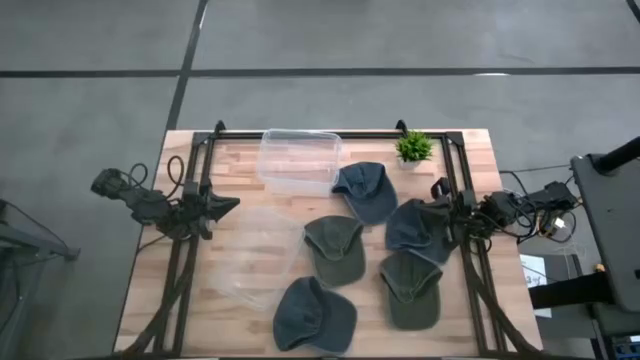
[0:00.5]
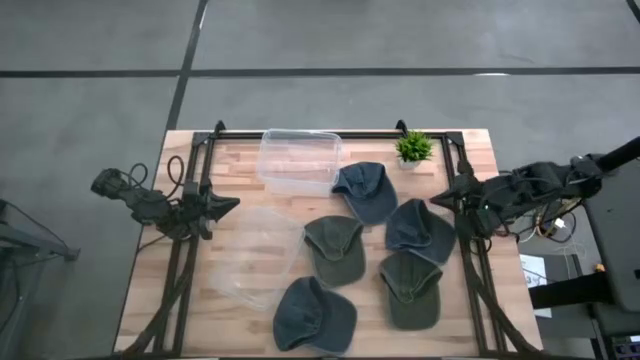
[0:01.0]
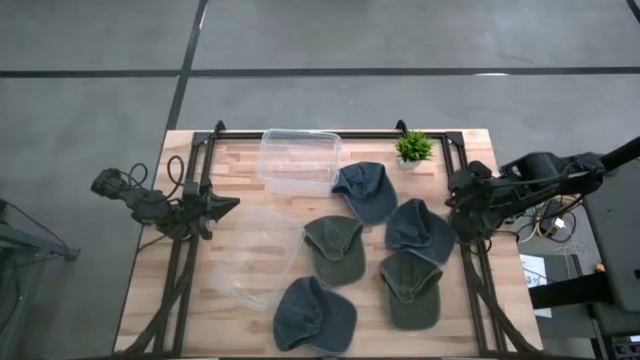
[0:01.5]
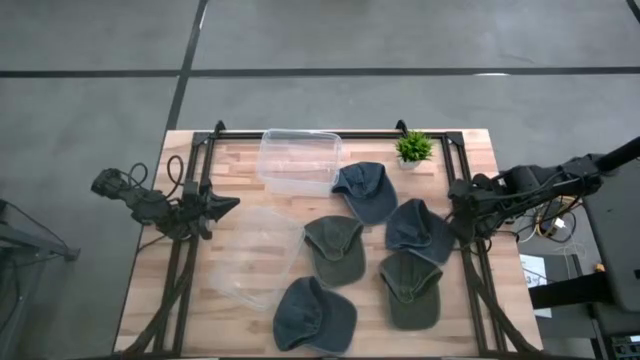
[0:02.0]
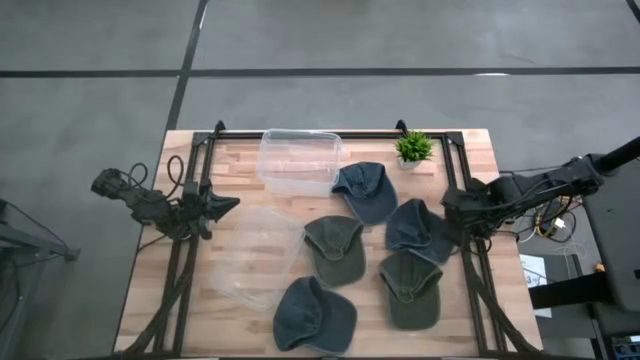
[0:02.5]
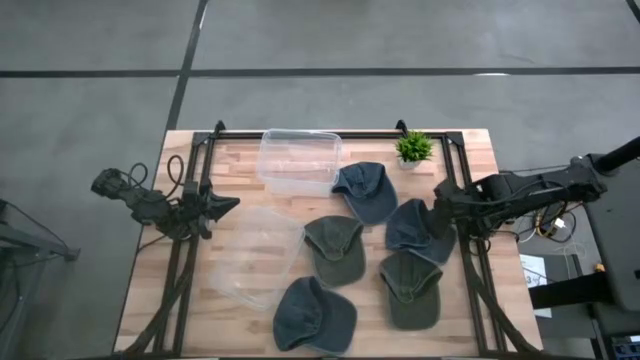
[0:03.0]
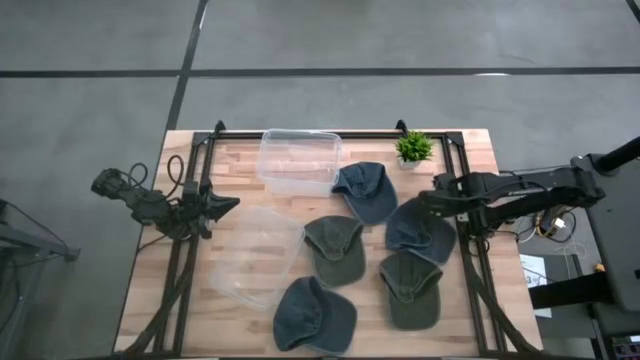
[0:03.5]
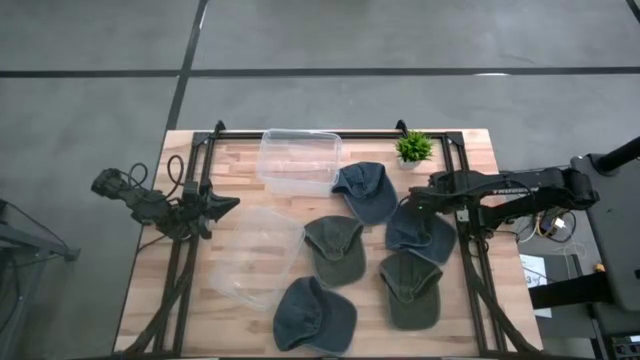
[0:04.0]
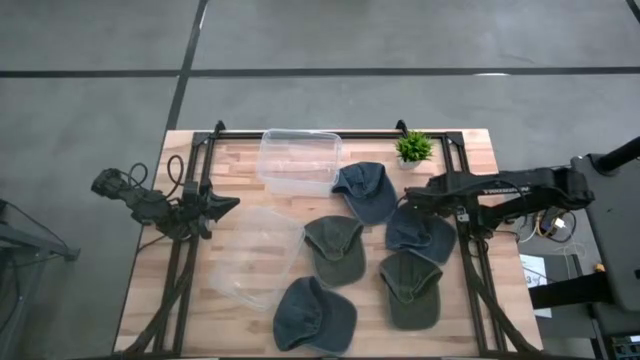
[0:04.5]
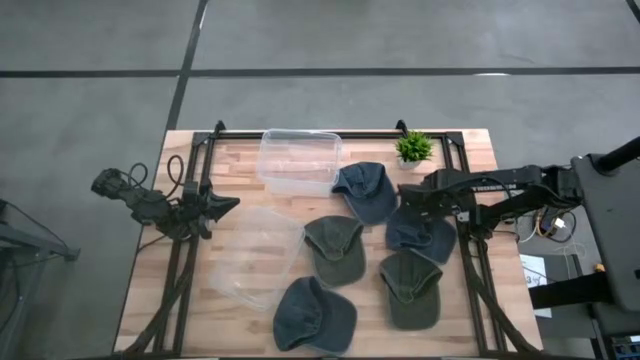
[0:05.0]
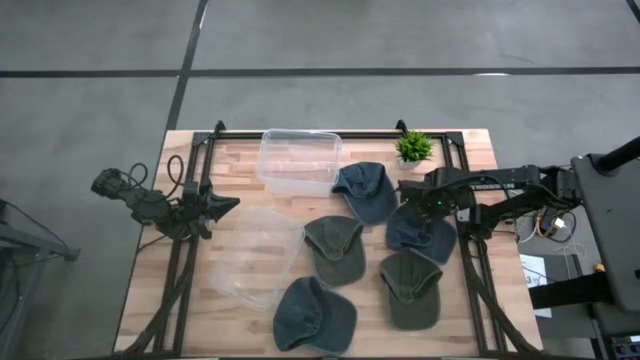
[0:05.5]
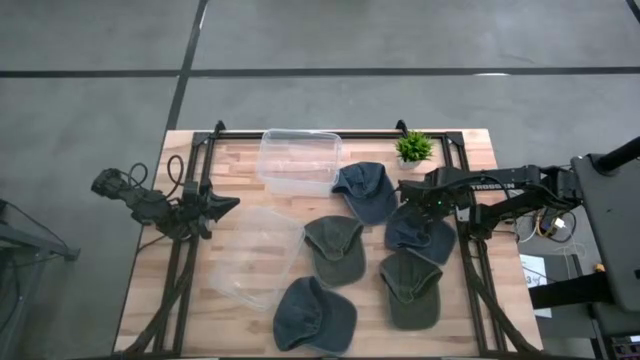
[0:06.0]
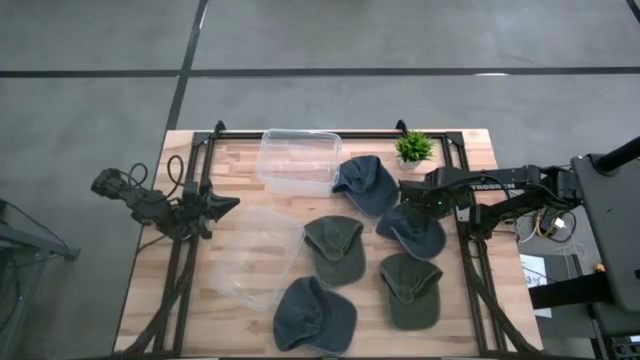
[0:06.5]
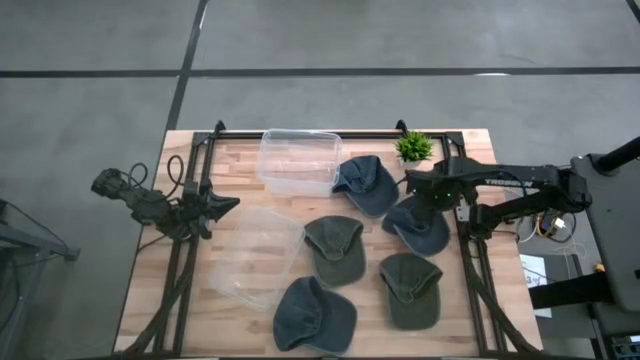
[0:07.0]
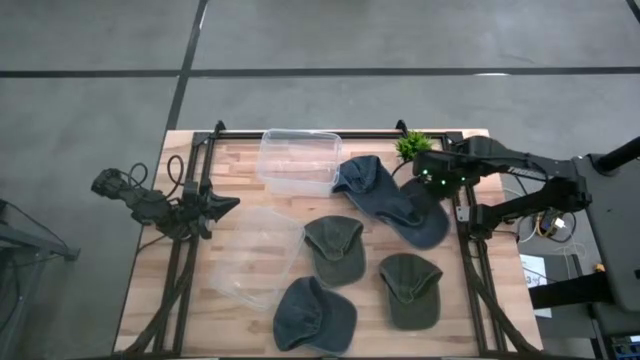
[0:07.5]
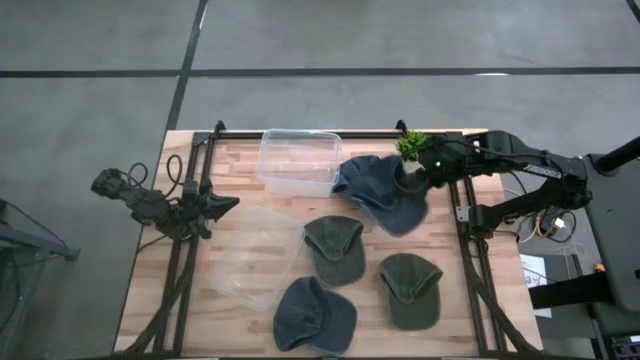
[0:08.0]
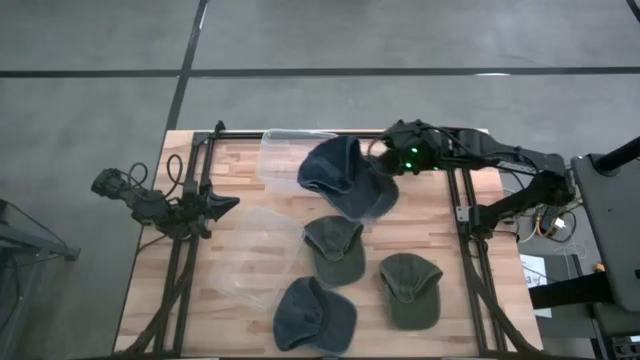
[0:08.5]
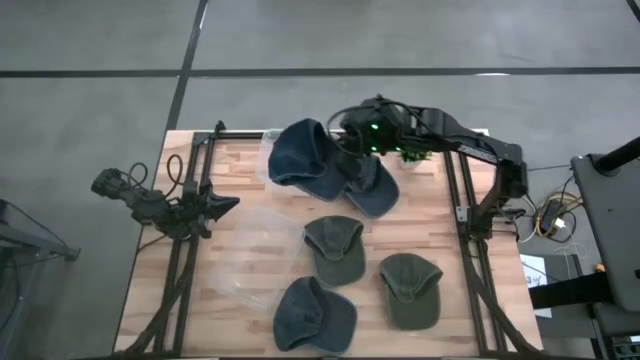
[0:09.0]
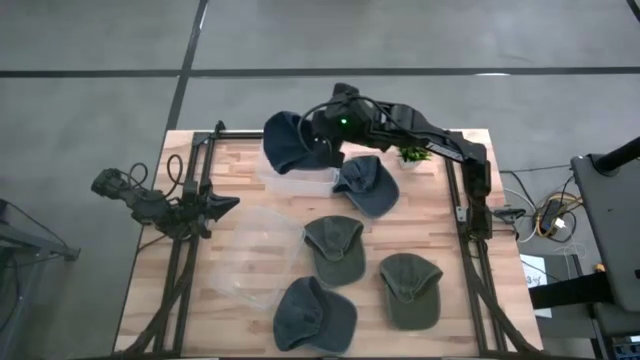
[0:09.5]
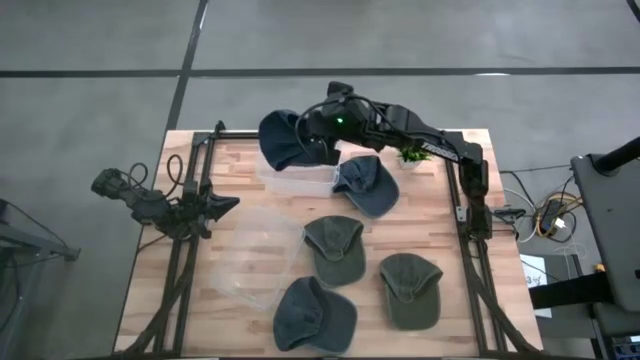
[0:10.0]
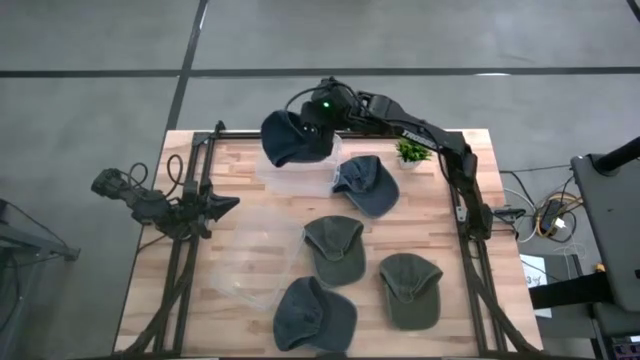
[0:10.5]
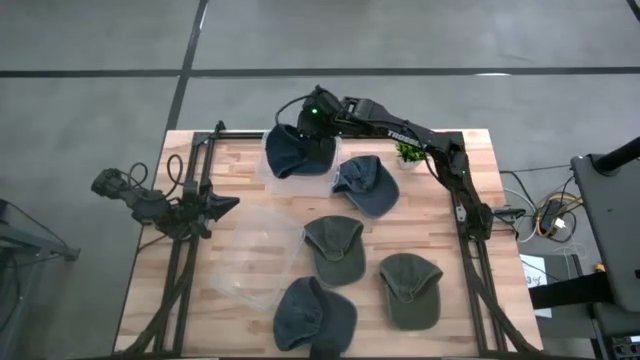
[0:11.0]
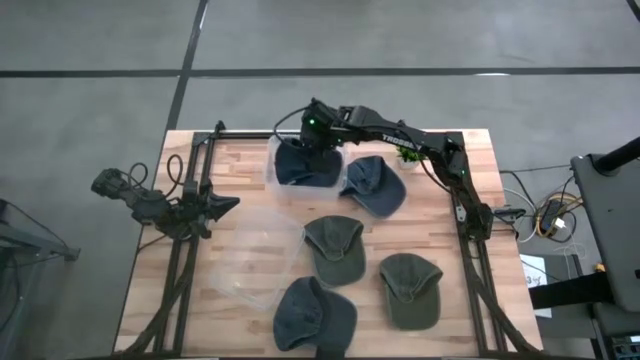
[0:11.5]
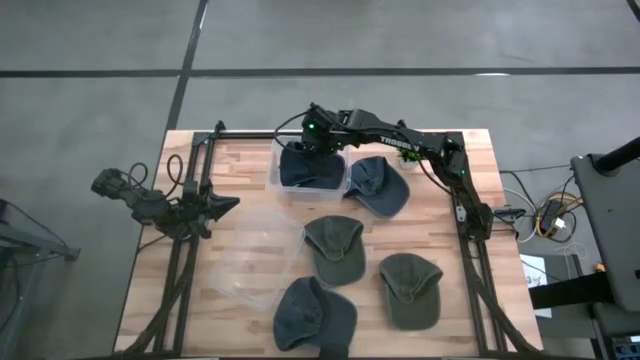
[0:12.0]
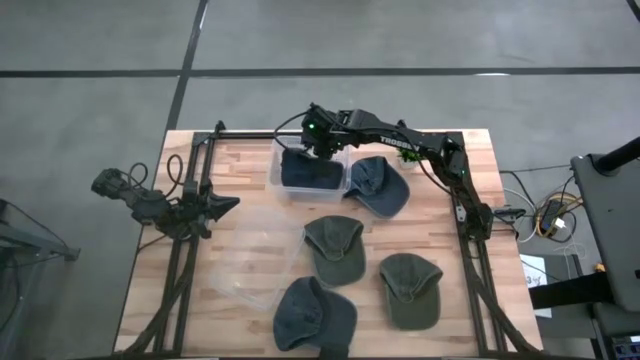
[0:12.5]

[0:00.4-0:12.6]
Task: Pick & Place hat
Put the top right blue cap into the top transparent bin

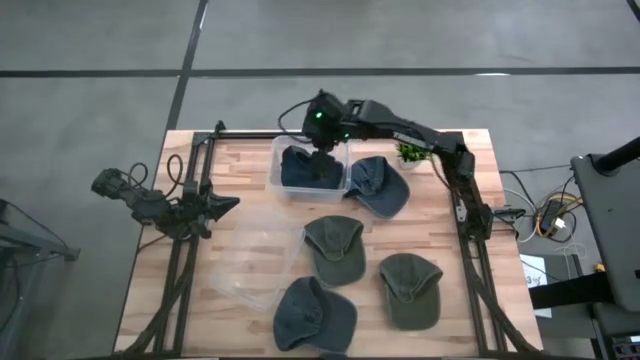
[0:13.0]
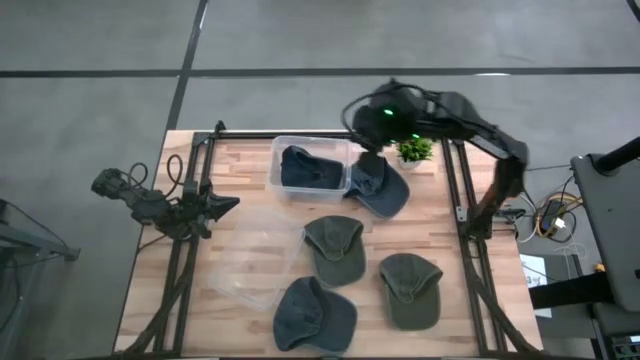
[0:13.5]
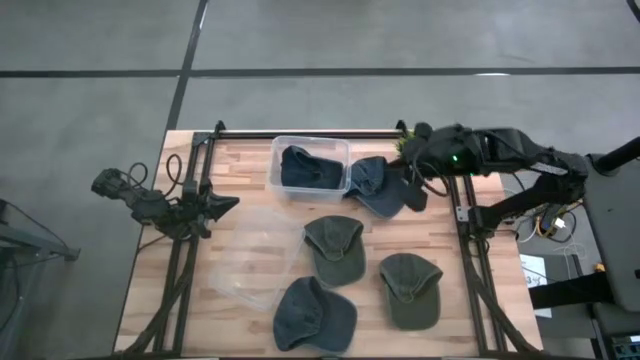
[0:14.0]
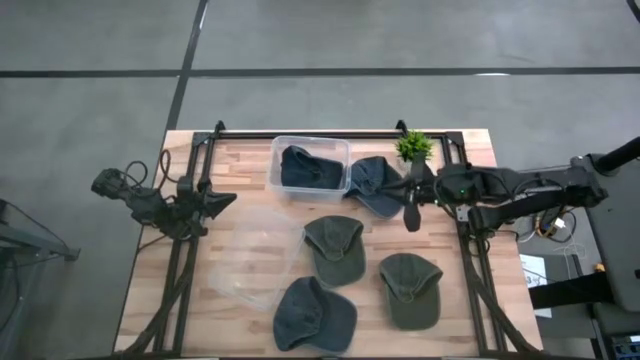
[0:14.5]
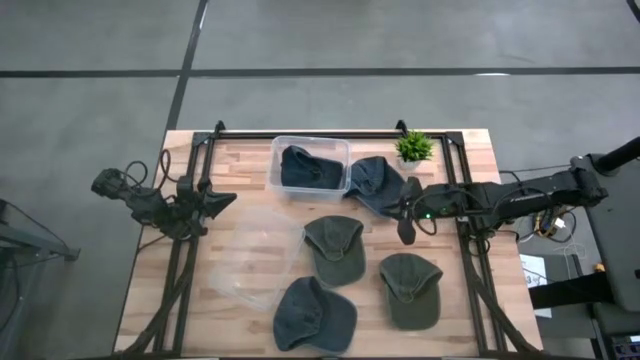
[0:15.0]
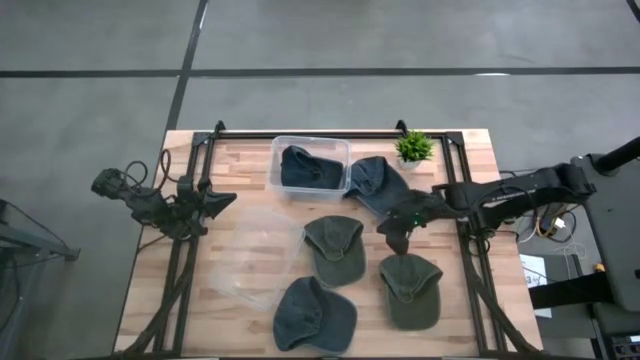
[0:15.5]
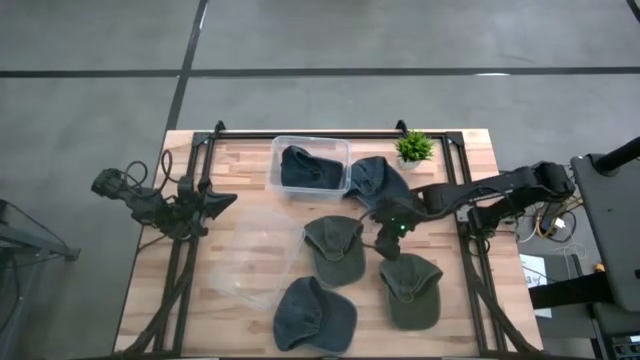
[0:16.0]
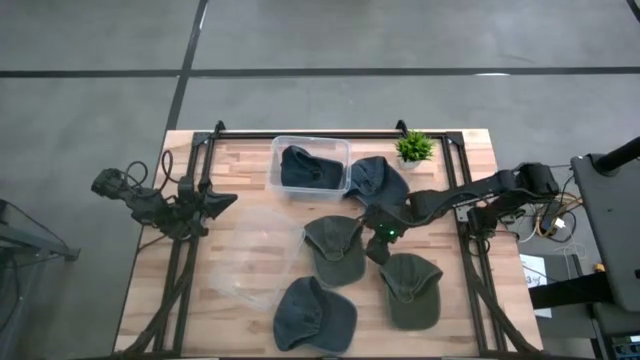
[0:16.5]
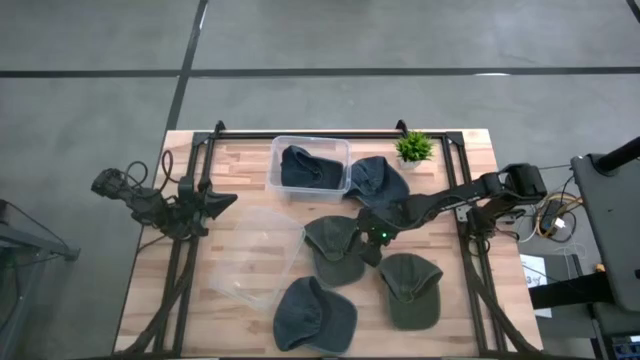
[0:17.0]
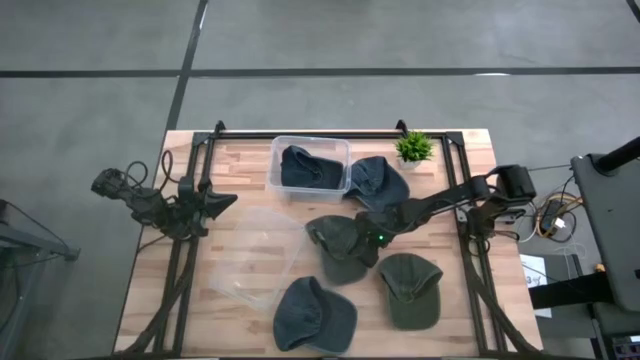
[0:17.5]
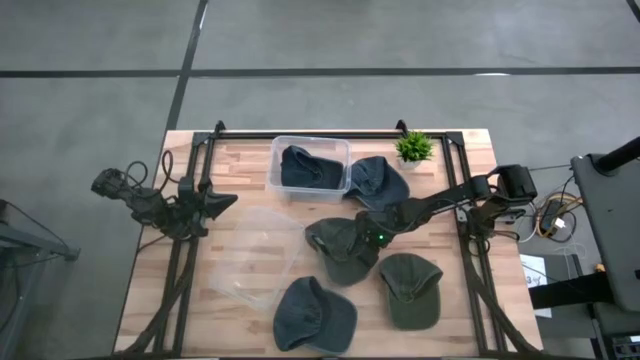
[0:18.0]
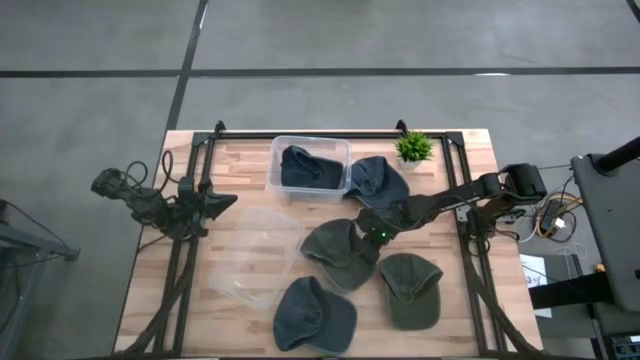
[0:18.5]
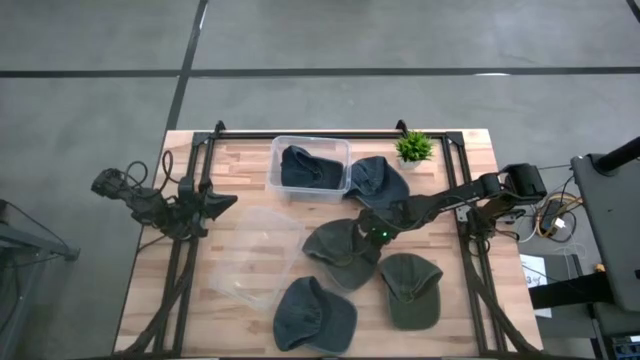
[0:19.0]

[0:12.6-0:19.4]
Put the left black cap into the bottom transparent bin

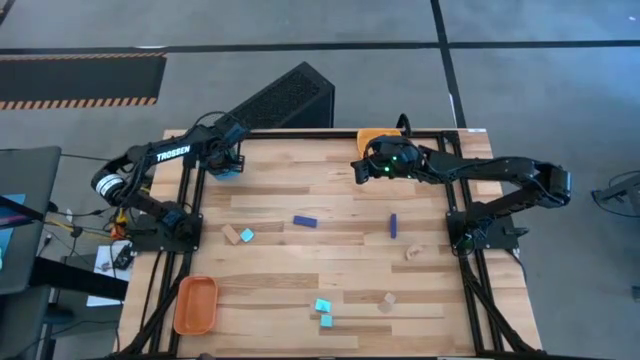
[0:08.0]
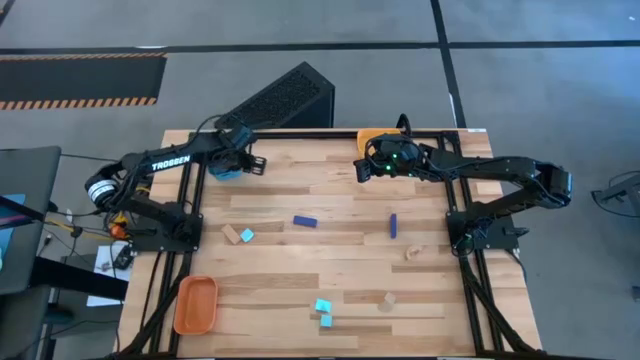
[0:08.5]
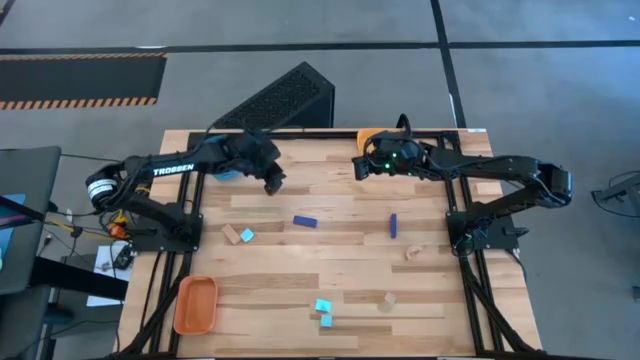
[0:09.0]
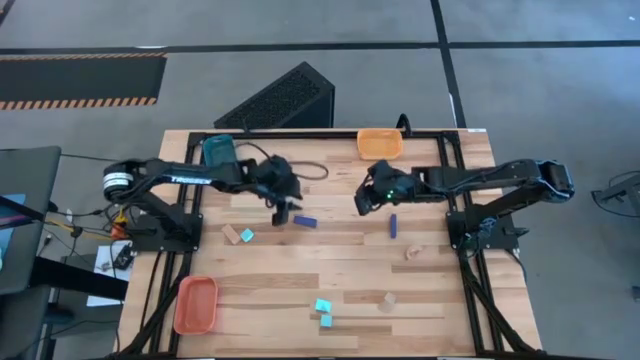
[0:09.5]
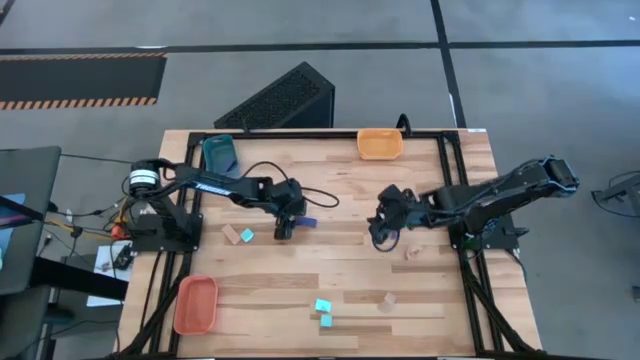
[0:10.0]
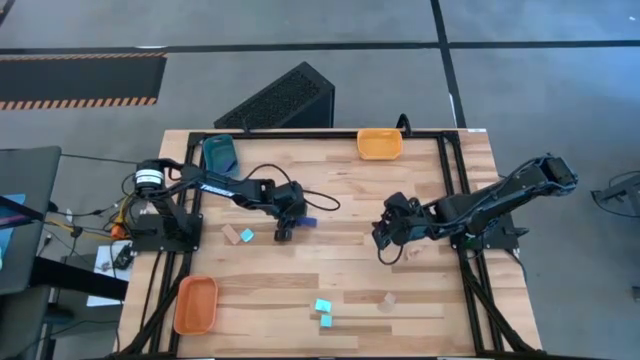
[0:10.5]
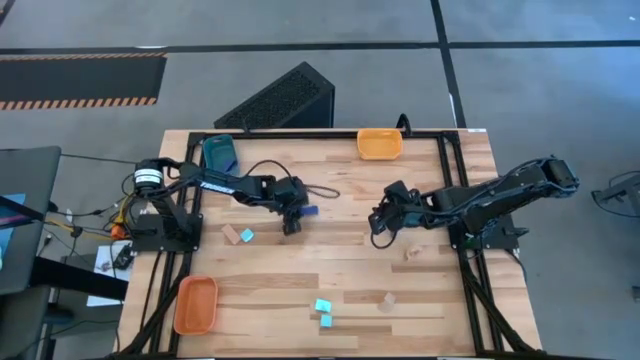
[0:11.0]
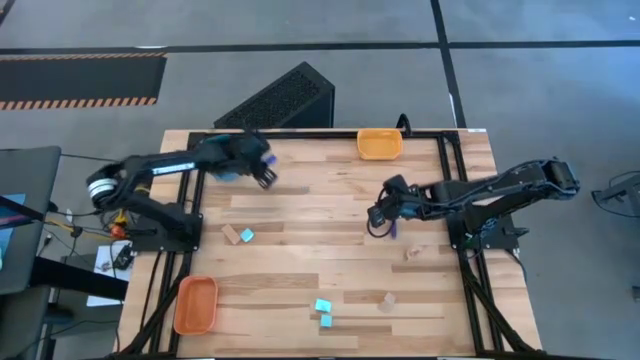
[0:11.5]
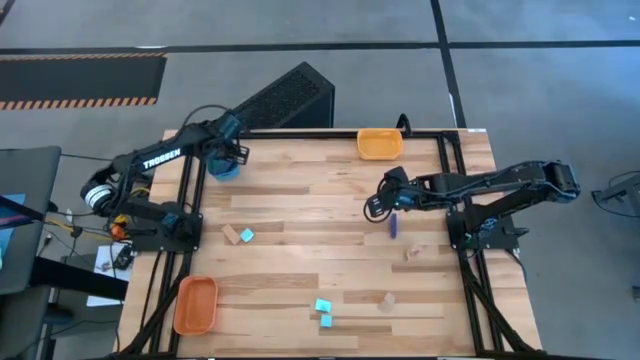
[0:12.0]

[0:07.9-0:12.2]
Task: Sort & place blocks by color
Put the left blue block into the green bin
